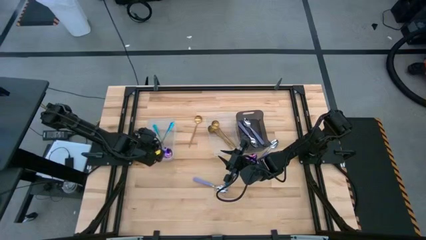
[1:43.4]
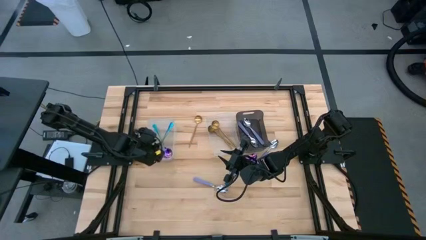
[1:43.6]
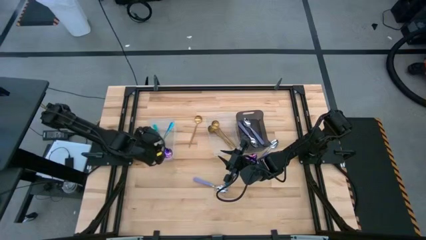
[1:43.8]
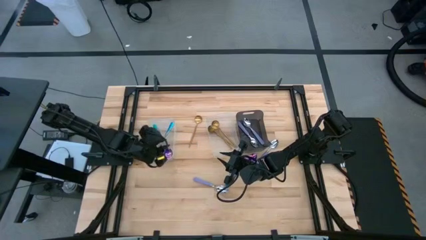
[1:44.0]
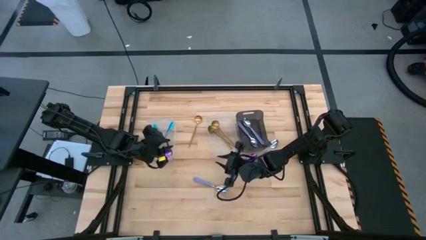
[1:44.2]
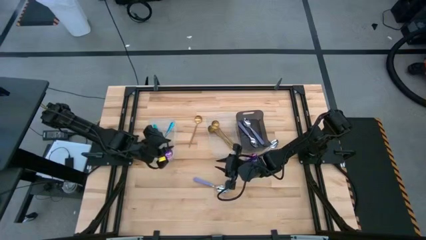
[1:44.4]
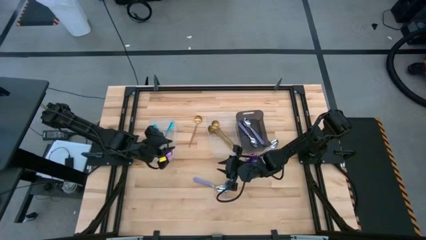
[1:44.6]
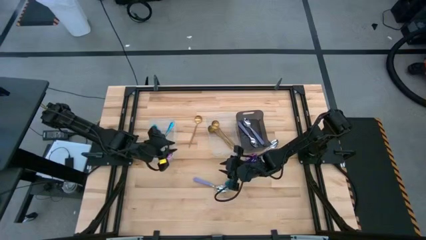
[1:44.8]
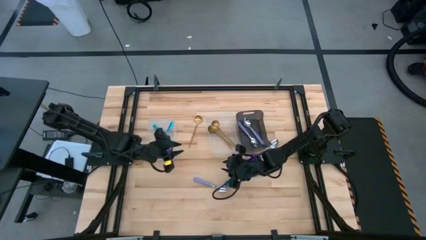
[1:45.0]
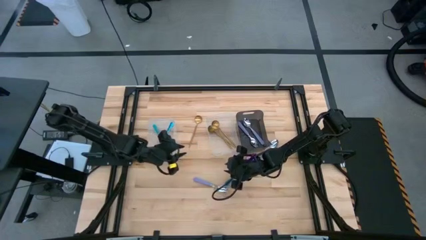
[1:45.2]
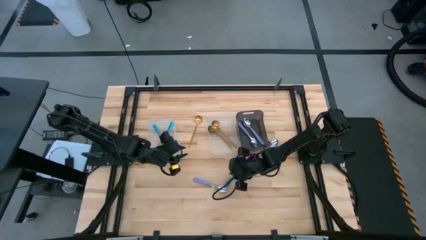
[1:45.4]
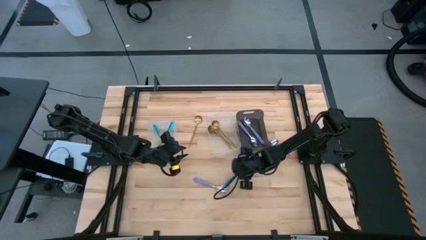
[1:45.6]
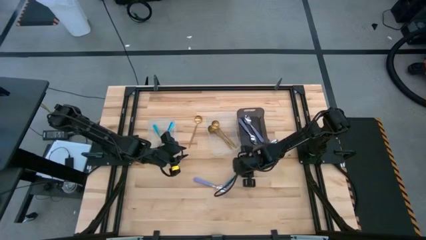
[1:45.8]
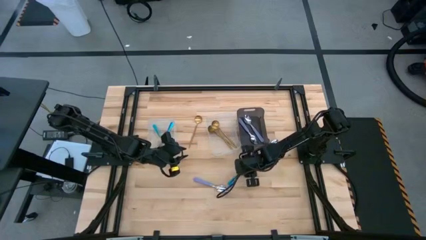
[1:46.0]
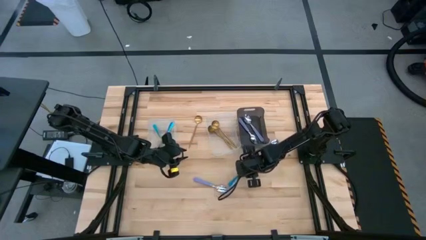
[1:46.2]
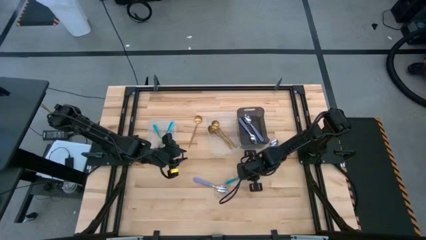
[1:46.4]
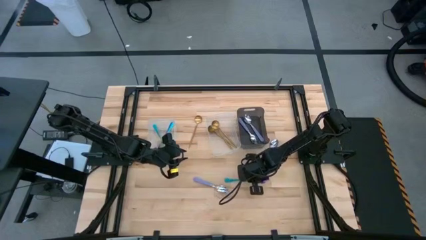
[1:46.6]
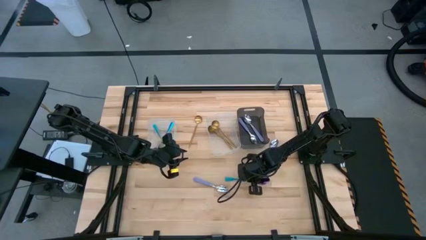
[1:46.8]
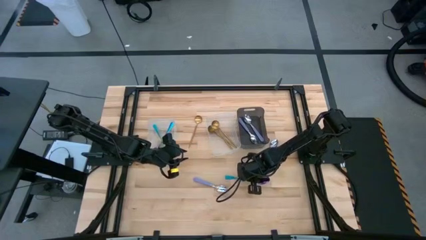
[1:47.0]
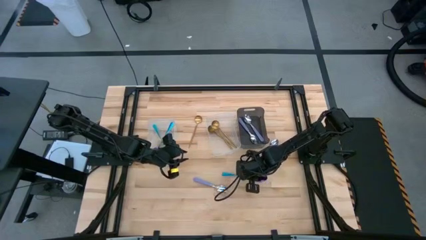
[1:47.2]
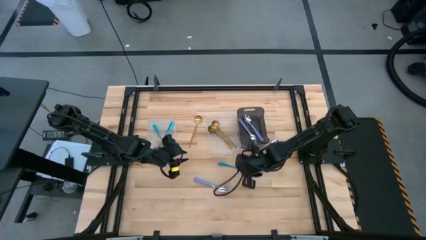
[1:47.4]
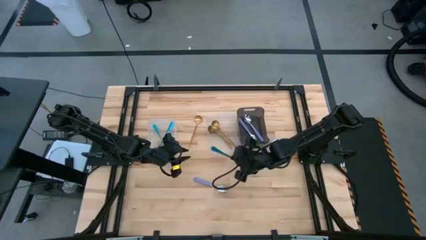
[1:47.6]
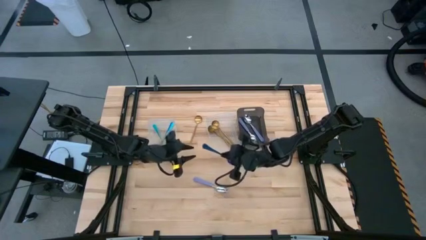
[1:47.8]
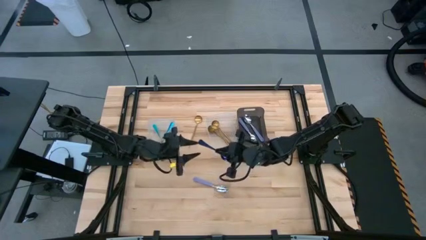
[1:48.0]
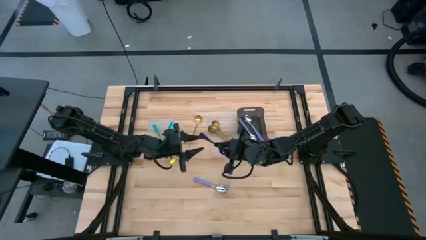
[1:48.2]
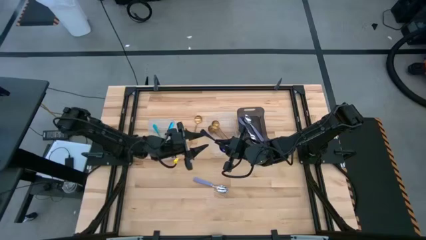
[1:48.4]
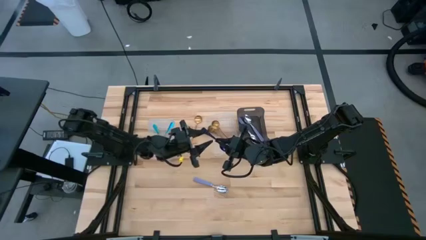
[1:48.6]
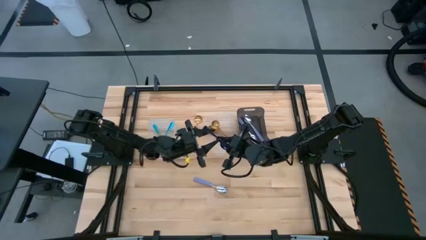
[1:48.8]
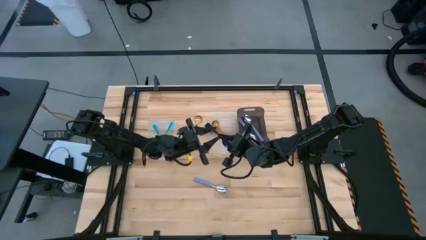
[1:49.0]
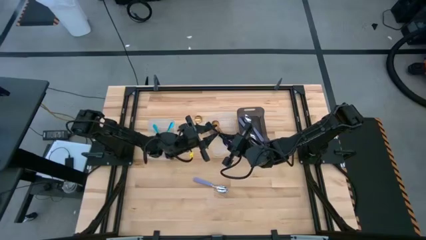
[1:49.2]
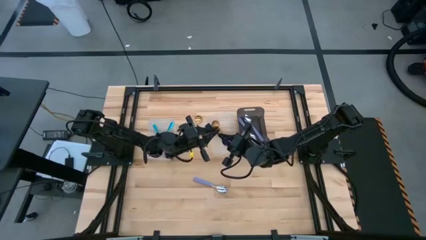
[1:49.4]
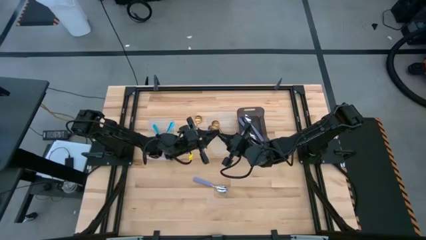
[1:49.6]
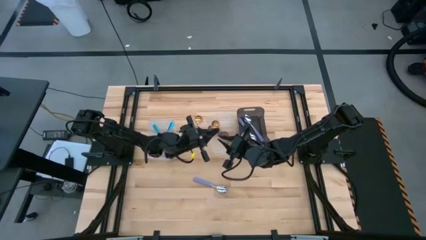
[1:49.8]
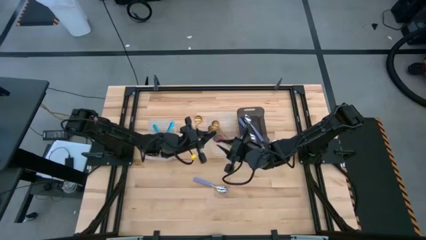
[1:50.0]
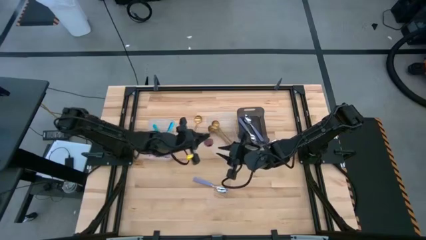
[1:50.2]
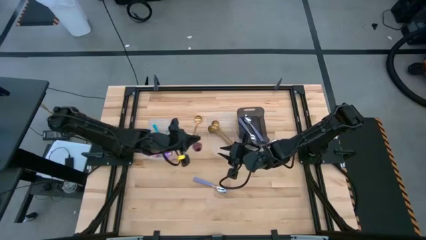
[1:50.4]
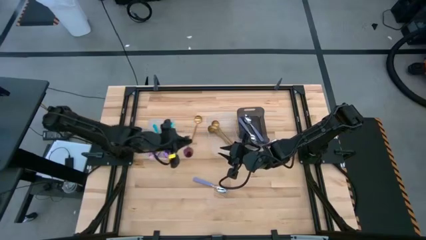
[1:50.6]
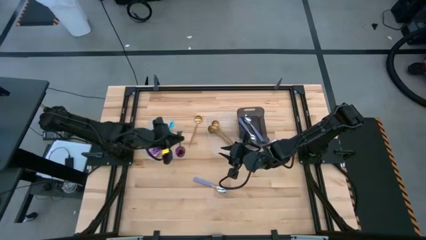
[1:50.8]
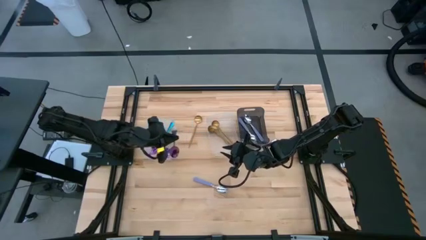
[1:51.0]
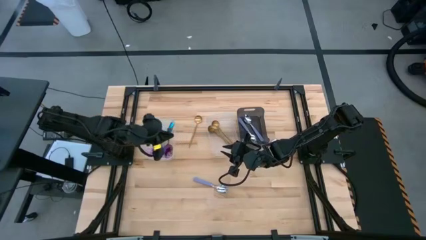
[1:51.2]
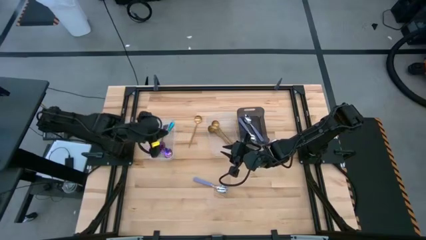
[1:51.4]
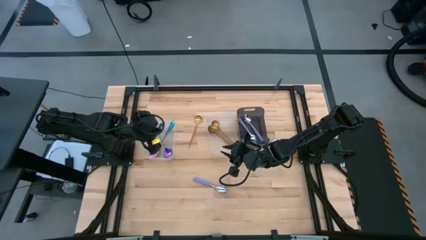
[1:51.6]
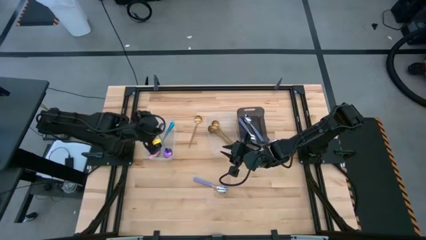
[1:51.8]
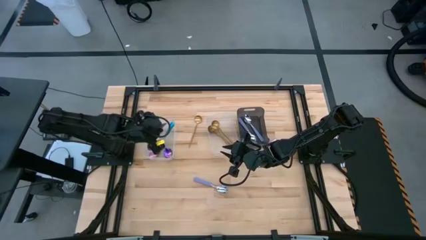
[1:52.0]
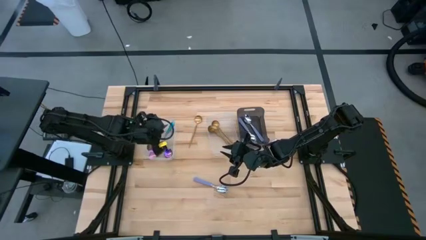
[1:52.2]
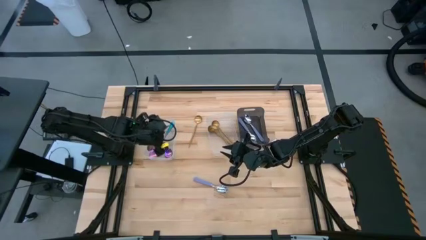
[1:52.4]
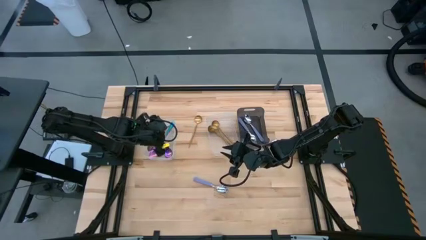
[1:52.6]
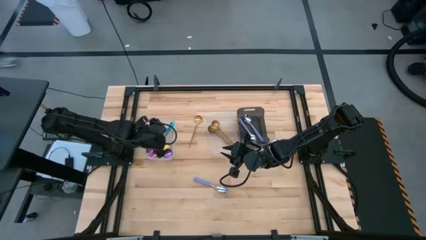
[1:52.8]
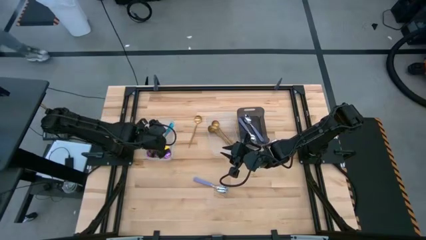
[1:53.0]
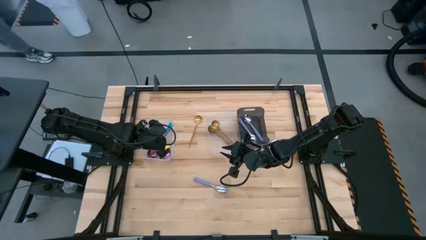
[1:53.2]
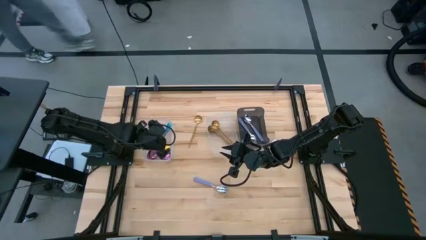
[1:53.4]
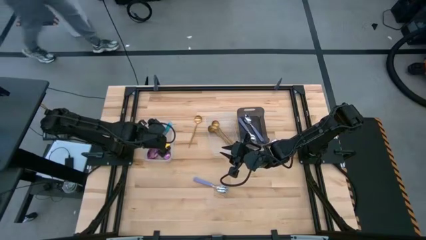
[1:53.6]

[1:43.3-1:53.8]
Task: Sort silverware by color (type)
Put the blue spoon into the left transparent bin

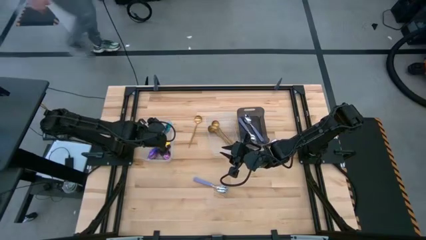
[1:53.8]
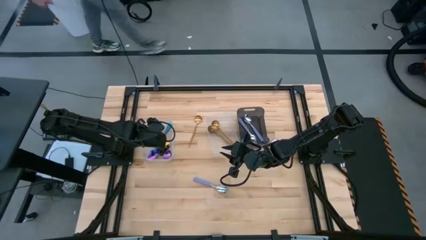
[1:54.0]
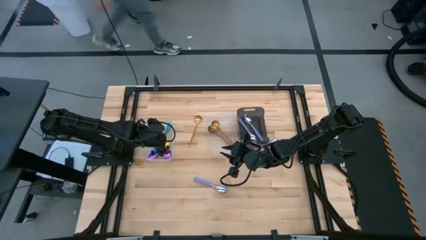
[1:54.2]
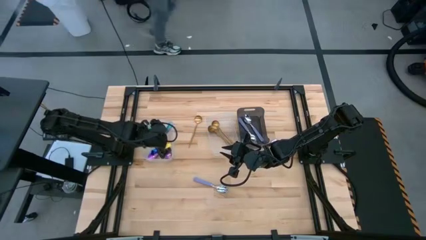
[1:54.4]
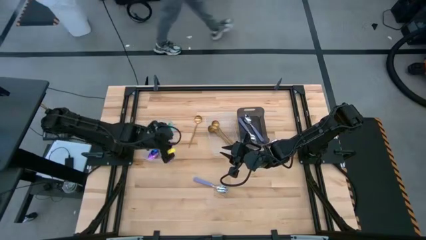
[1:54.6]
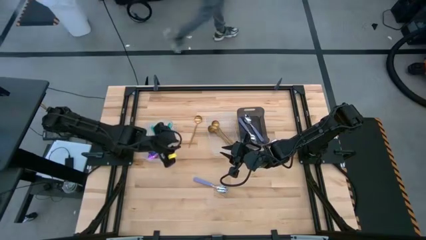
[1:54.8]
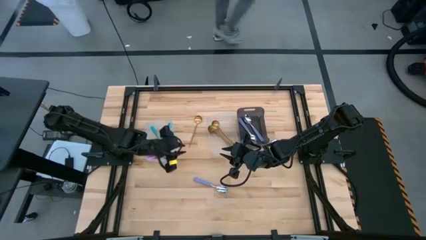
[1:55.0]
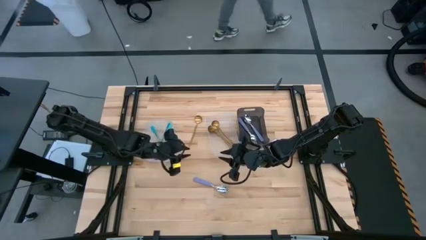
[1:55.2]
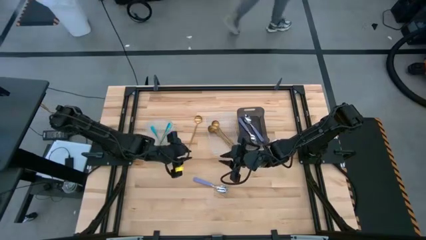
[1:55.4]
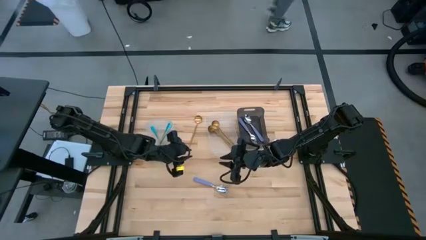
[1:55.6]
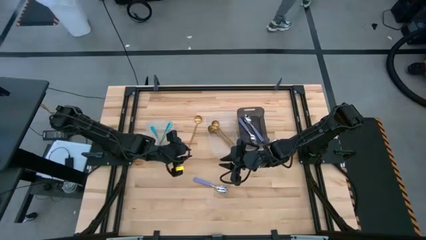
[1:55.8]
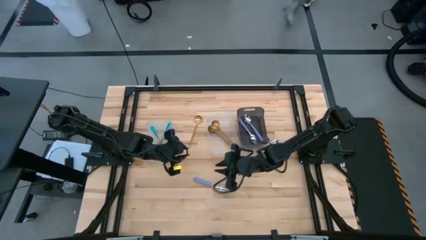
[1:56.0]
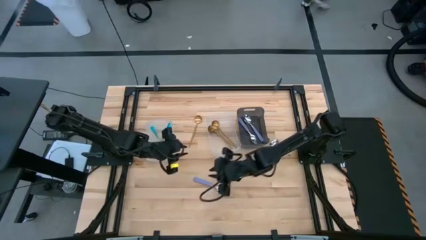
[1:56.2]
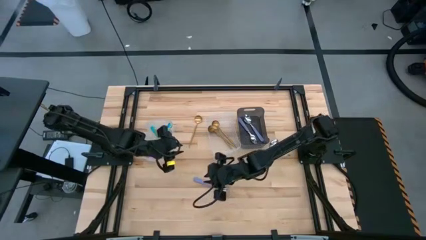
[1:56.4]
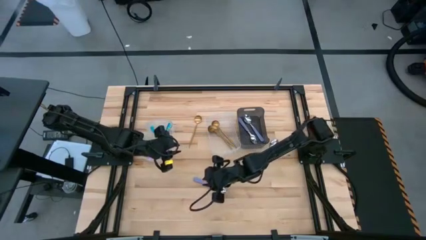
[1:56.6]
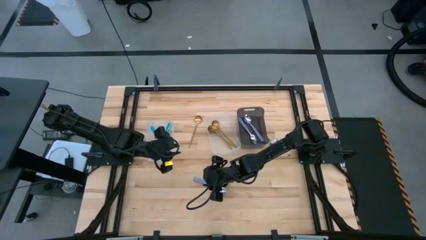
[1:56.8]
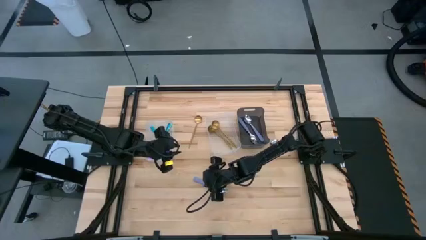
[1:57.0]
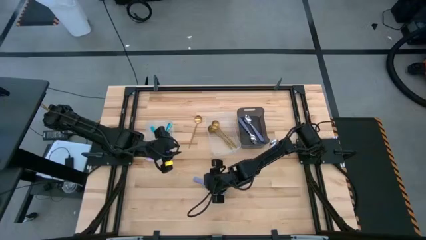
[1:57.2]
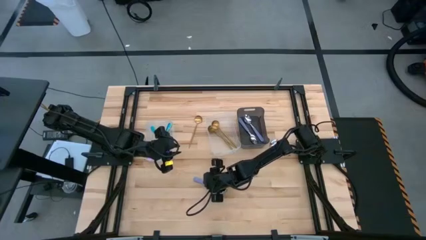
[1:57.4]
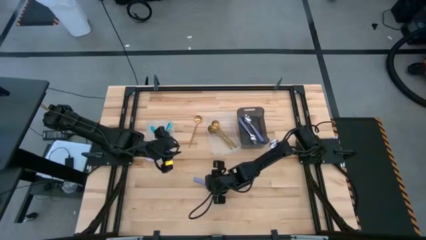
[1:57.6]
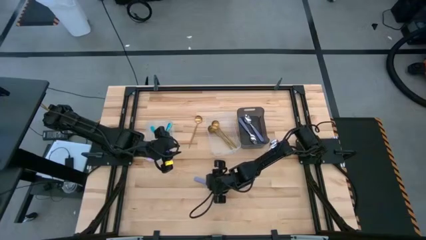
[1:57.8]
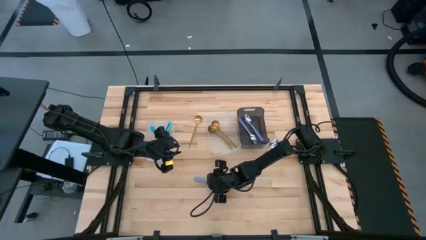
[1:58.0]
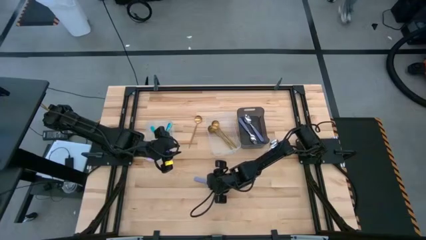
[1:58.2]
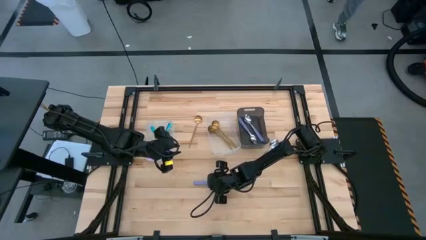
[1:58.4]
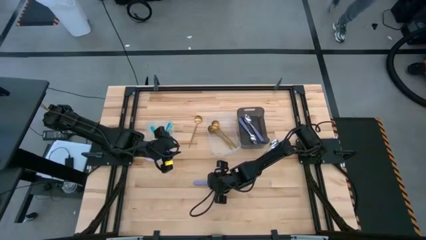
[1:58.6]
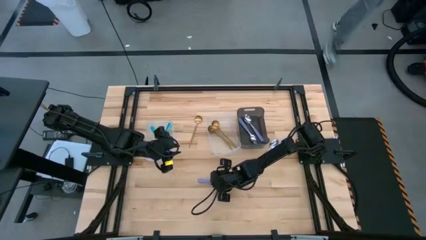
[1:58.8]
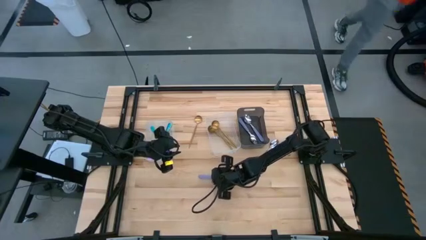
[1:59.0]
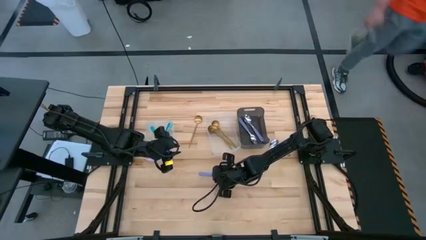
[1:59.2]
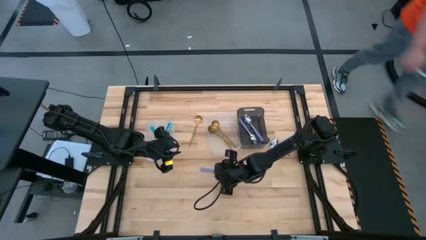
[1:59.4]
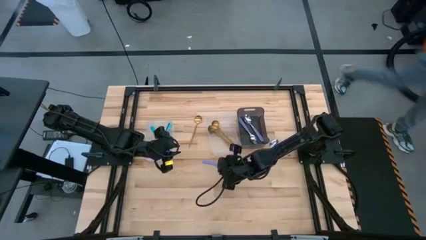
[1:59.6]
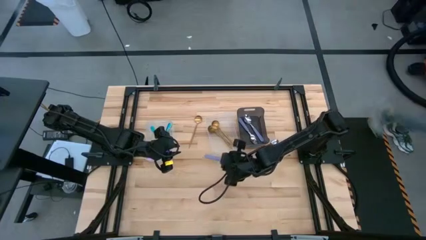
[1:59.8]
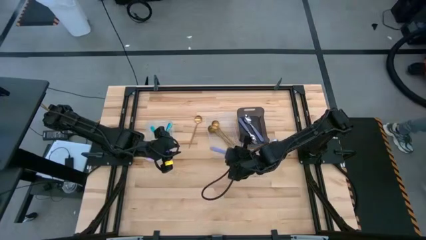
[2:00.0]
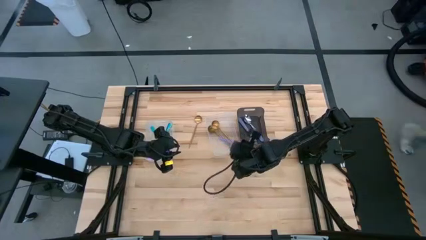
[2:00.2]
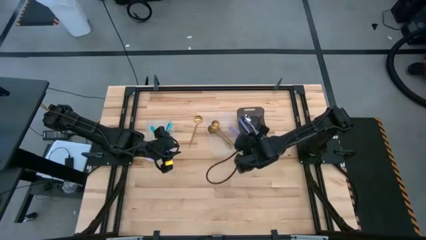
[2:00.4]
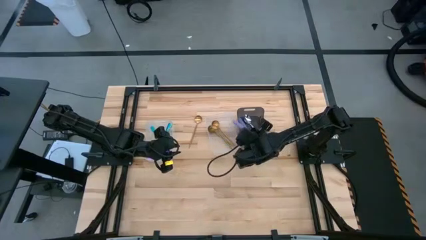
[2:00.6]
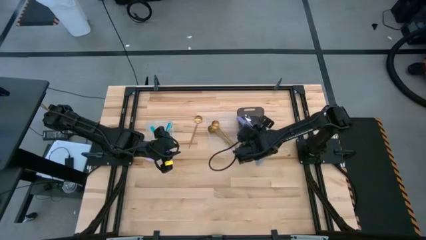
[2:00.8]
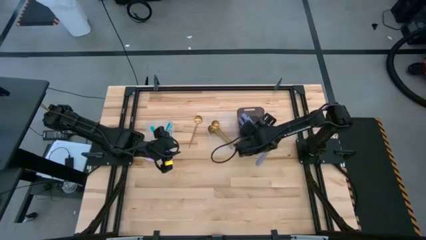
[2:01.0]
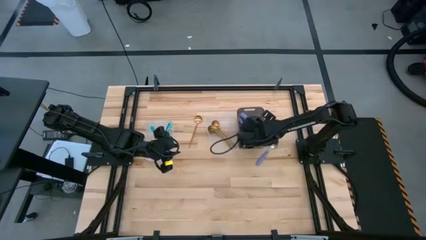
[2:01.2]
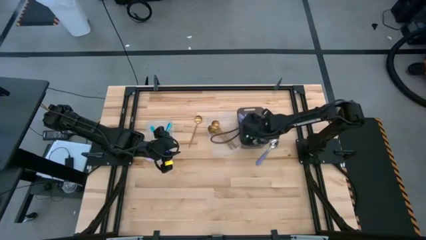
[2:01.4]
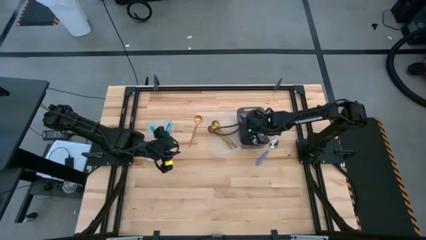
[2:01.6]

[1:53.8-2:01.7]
Put the purple spoon into the black bin
